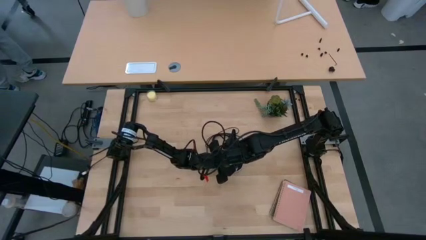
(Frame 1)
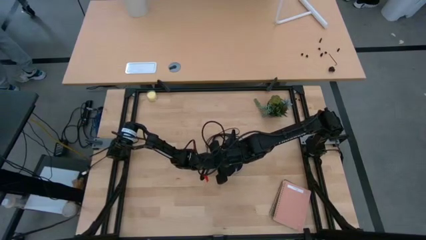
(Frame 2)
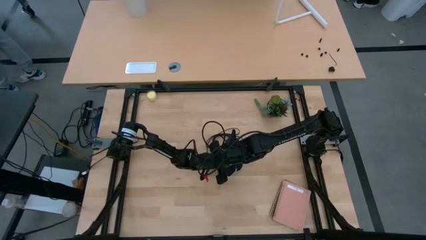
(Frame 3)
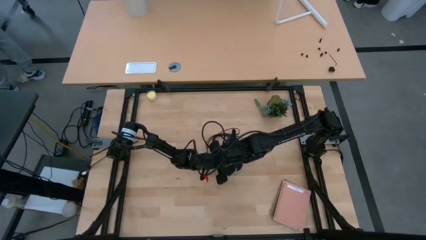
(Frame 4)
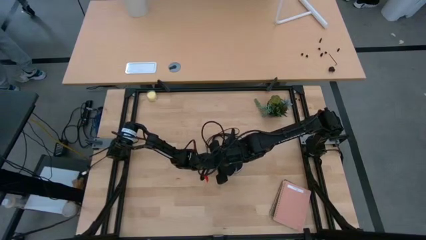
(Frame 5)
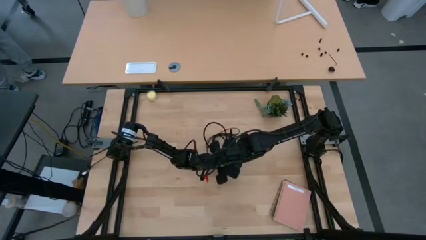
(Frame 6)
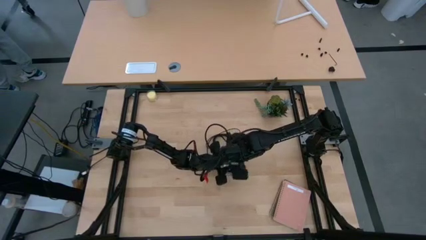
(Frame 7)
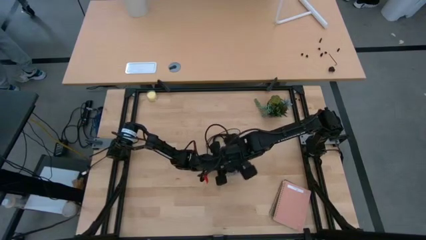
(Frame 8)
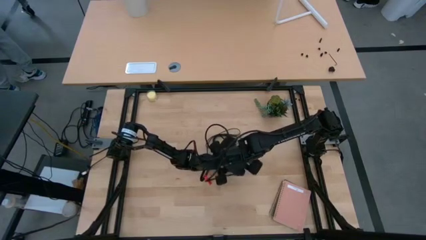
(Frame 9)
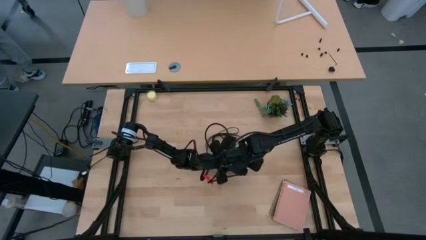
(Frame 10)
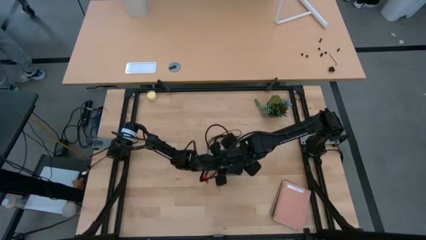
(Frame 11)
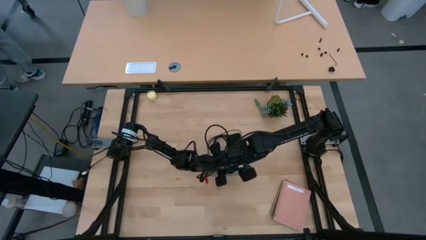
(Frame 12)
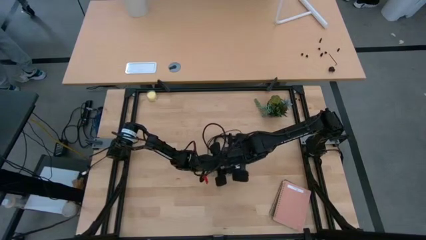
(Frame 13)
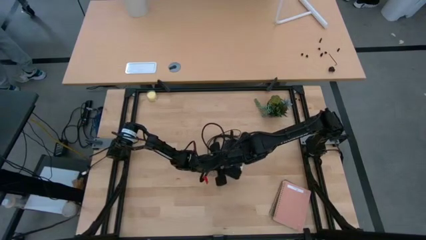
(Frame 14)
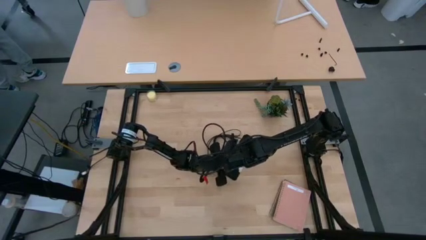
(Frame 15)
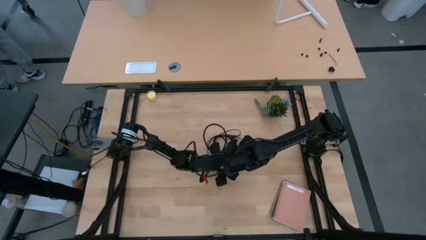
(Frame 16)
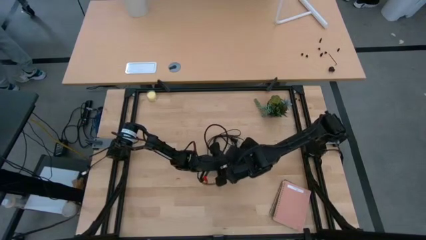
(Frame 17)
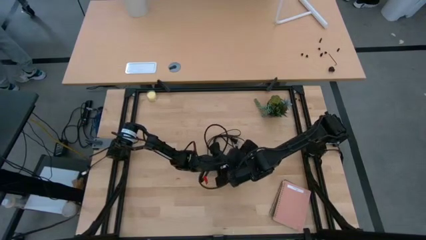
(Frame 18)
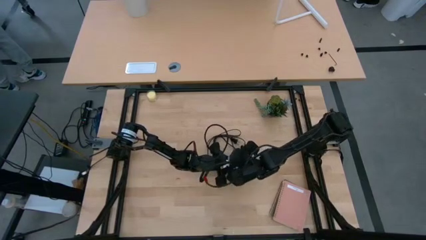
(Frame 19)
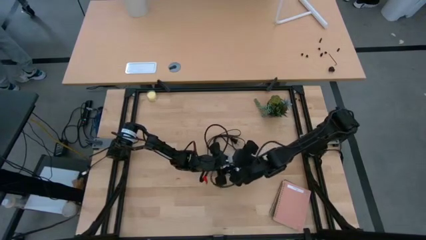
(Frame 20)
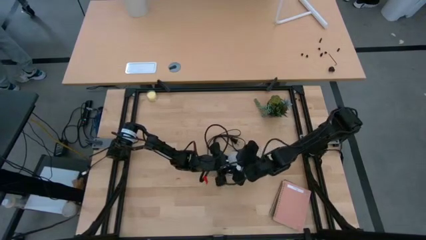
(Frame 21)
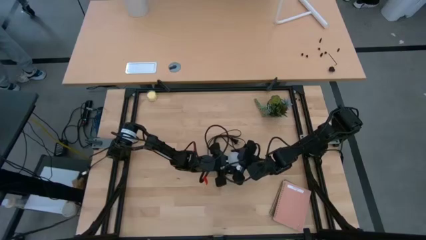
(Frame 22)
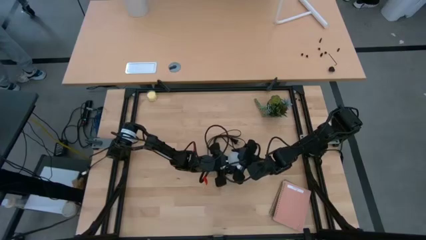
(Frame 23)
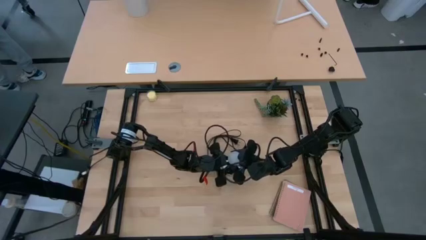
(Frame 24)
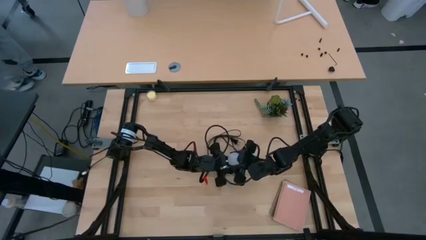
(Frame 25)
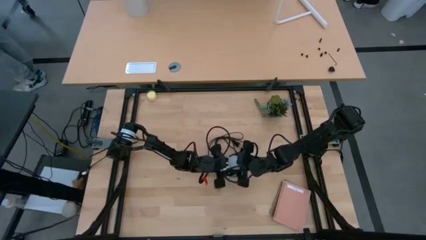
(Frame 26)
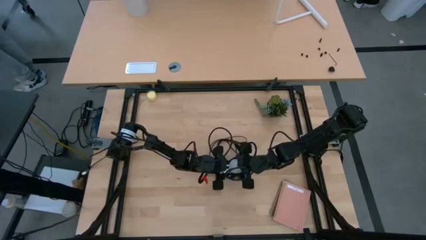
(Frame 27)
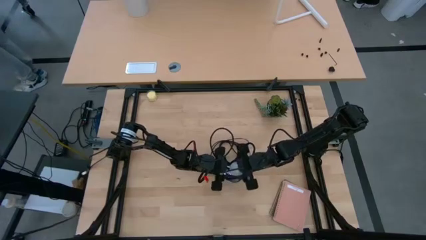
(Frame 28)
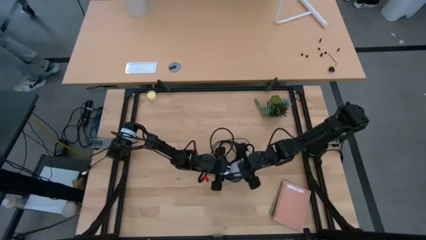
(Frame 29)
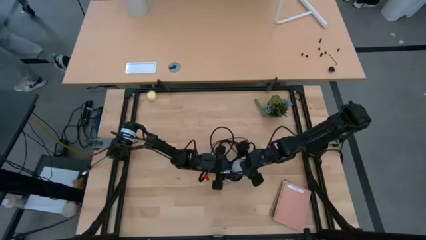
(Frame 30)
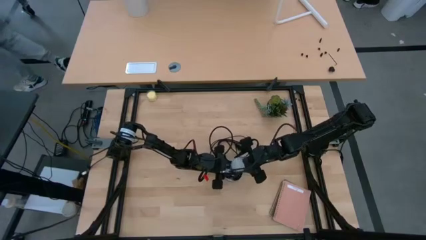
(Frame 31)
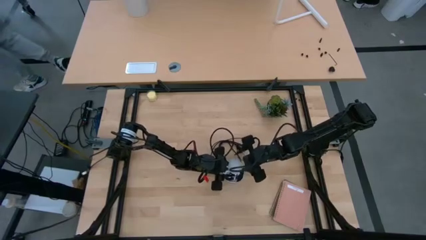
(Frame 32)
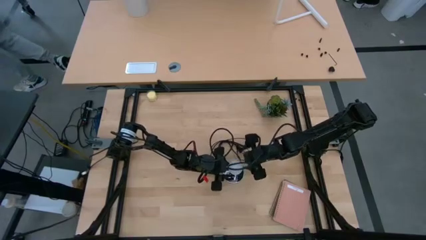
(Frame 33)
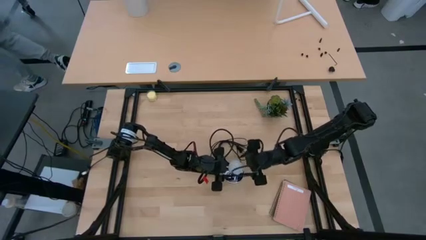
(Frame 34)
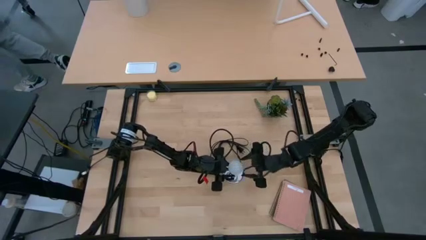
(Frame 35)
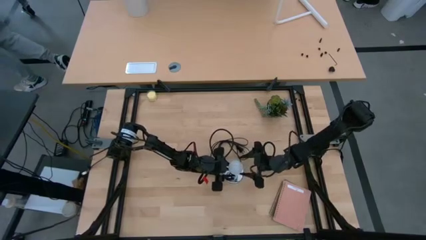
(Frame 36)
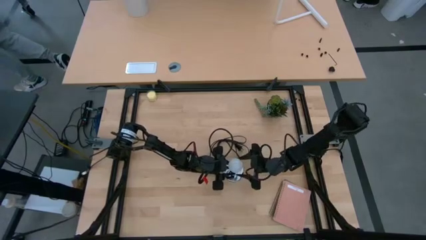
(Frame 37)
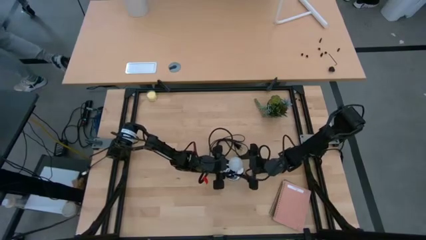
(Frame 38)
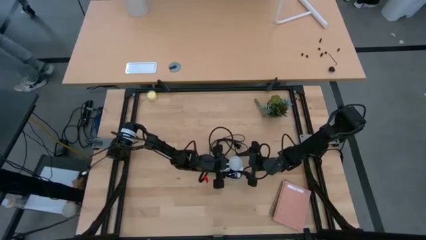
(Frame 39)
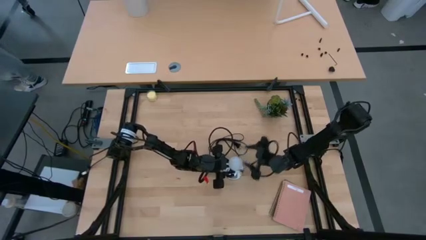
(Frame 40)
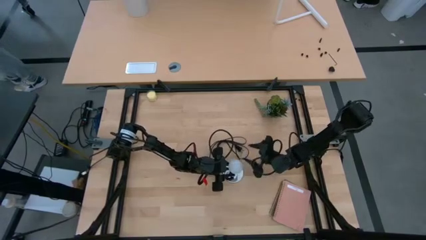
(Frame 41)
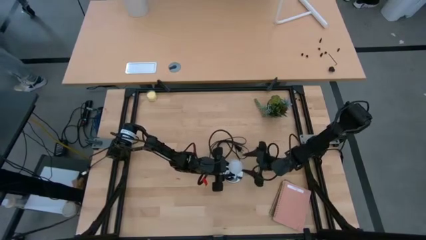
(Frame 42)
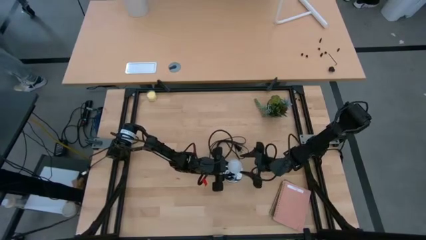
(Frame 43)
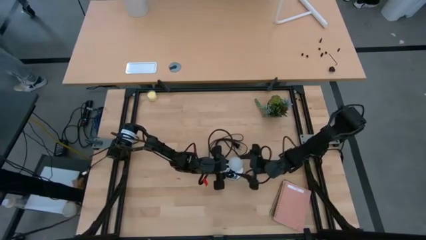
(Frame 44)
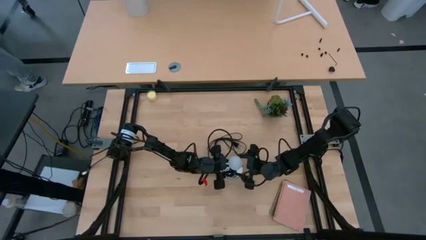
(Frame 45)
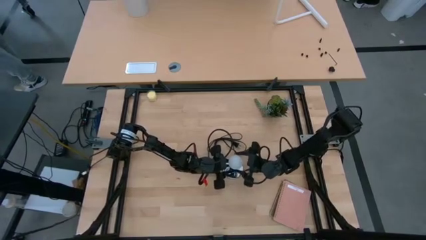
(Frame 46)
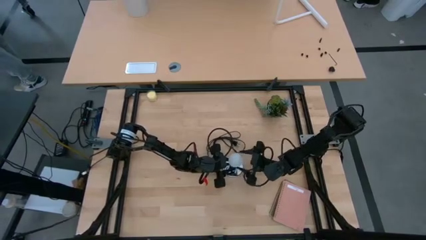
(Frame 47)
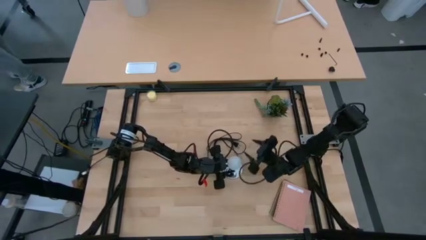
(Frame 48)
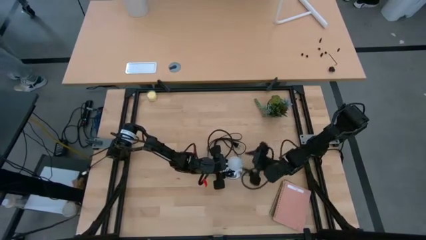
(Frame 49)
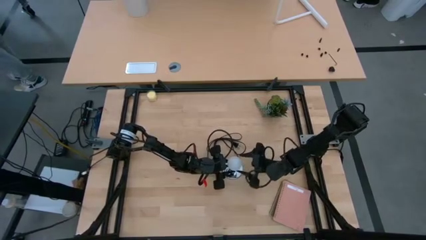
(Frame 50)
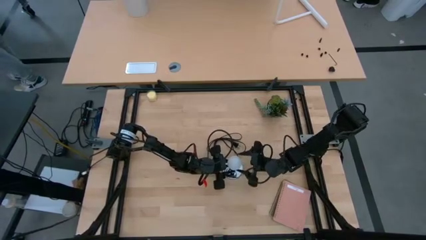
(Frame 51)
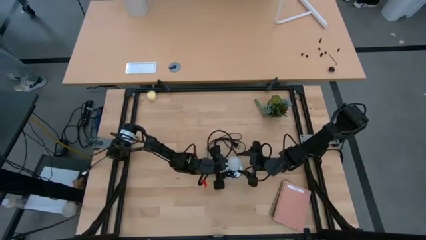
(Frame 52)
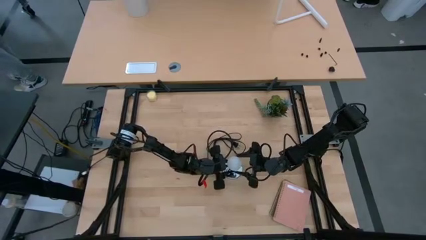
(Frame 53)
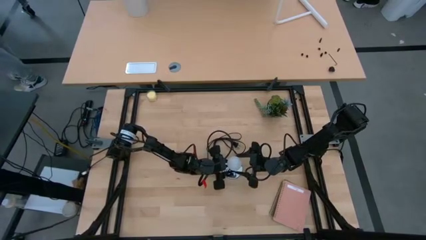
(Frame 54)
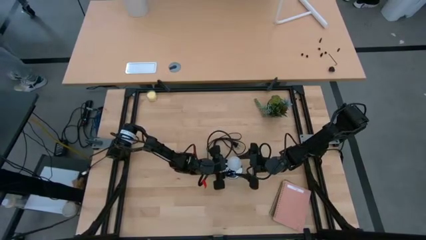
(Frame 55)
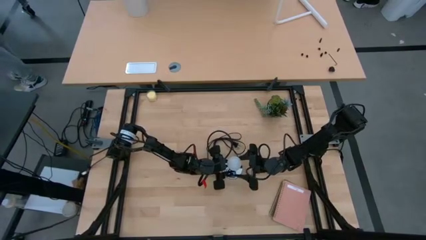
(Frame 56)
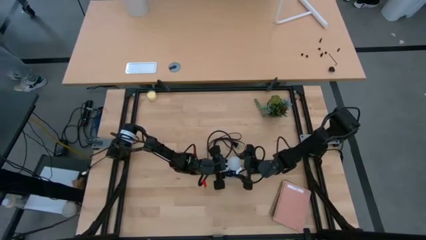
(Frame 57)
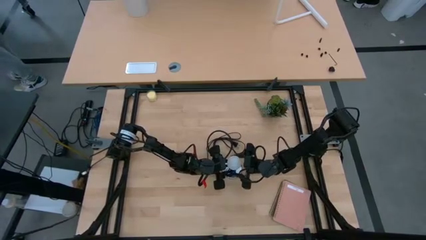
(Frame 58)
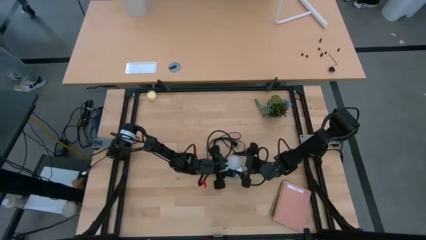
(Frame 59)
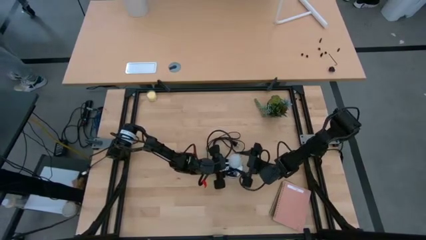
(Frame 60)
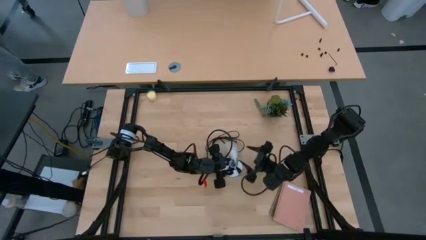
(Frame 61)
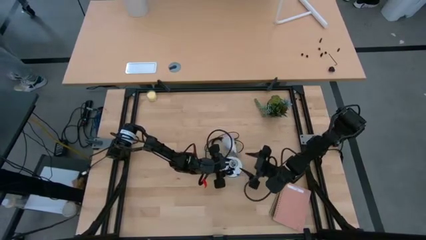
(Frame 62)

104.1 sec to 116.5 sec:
Task: Screw lightbulb
Remove the white lightbulb from the lamp

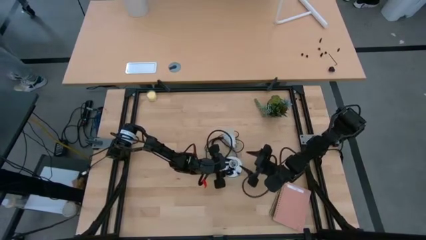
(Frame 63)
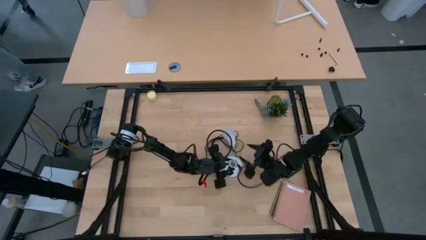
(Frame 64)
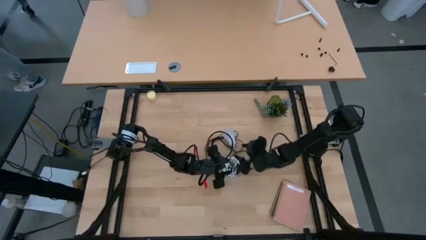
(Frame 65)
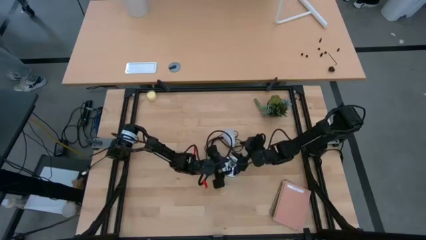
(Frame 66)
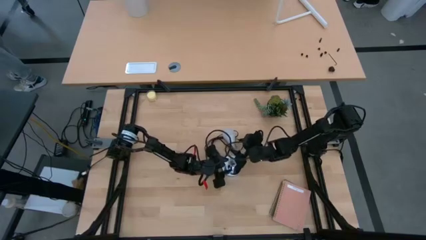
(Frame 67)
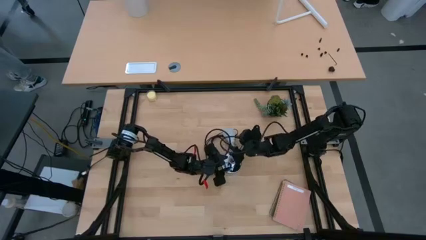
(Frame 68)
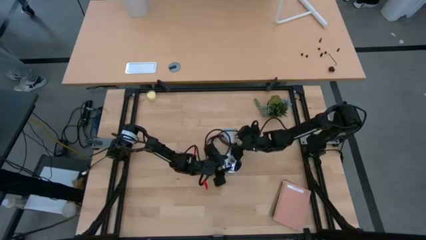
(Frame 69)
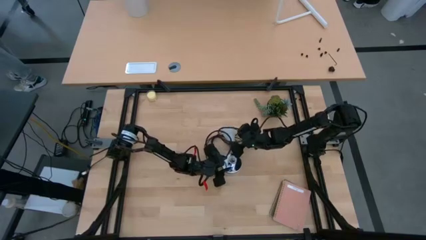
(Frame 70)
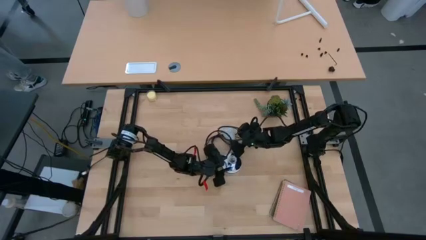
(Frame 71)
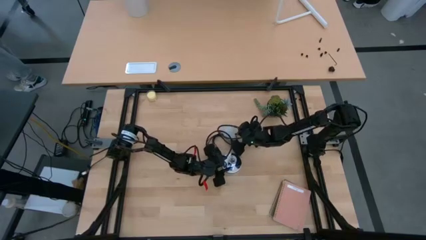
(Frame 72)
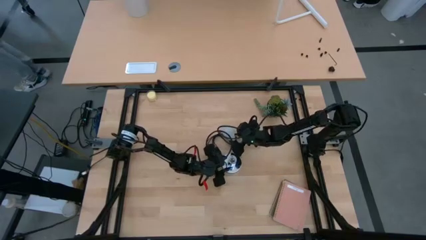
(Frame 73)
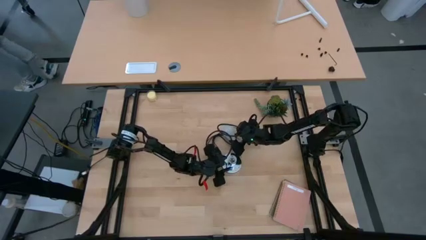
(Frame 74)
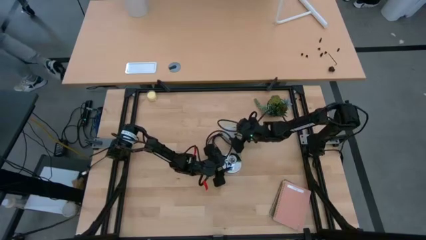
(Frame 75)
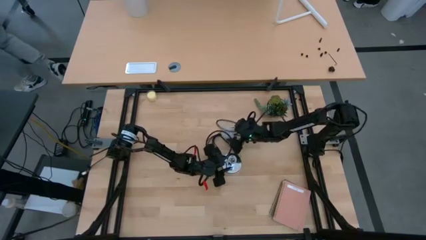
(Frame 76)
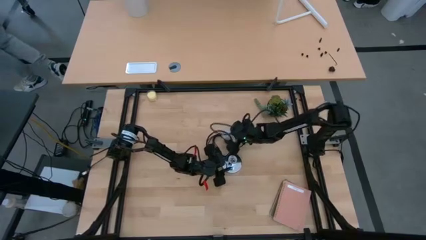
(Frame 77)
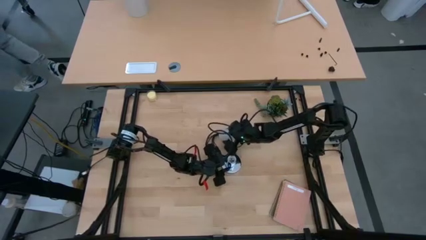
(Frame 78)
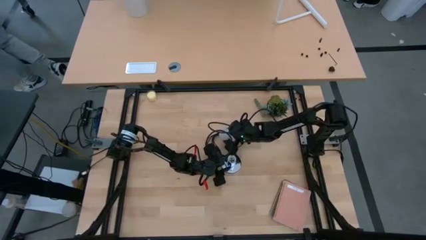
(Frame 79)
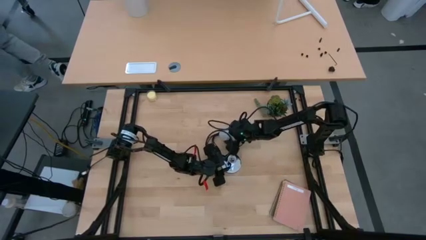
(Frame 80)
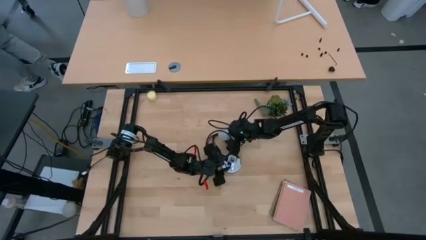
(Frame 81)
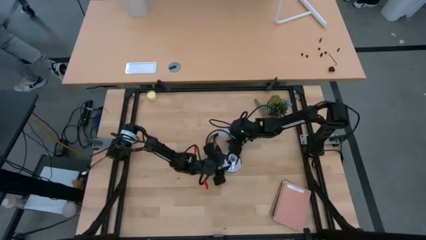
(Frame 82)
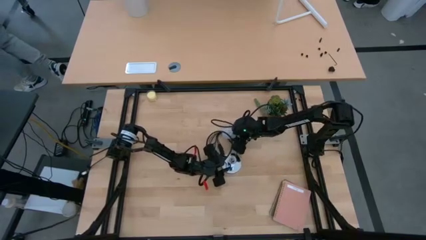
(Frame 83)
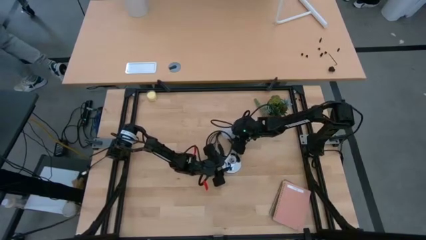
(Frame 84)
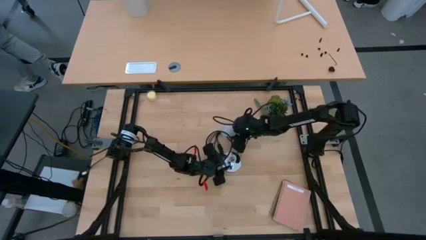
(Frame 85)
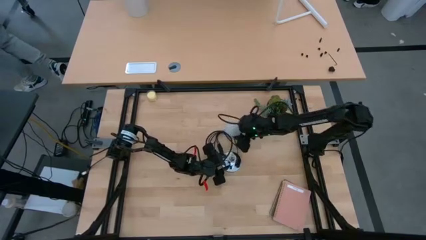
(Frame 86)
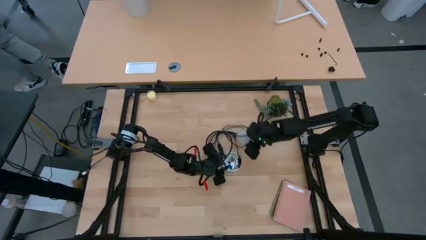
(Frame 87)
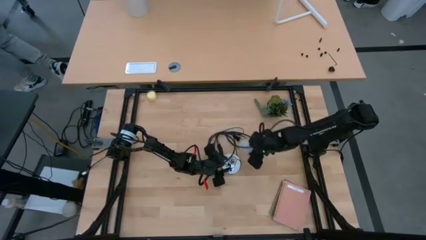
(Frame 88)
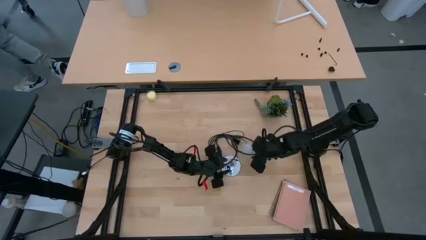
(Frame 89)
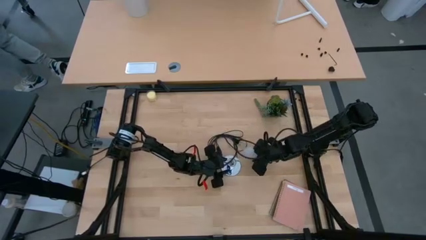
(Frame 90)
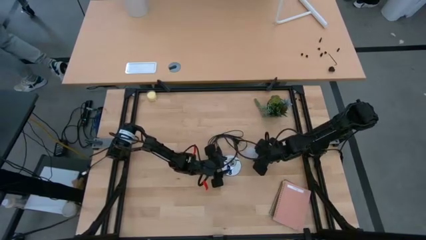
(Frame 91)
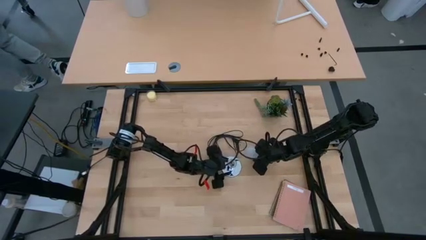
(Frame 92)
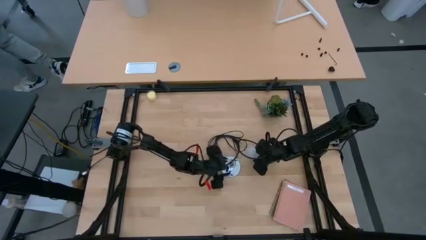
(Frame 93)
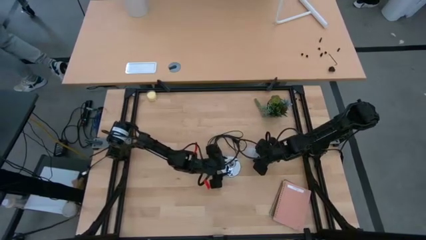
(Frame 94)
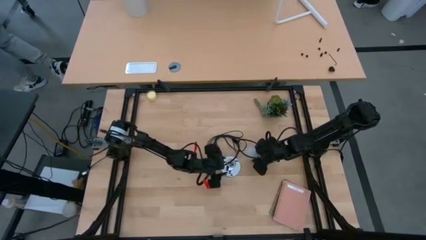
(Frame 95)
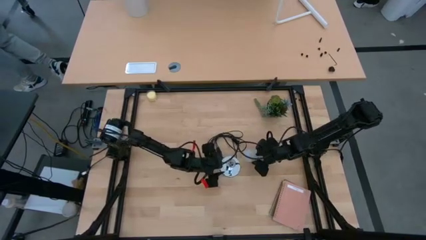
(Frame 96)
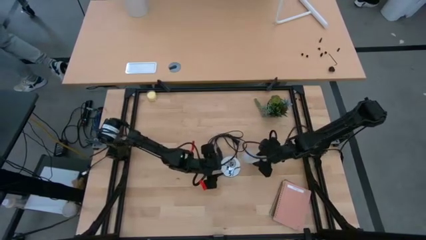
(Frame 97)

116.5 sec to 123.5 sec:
Move the white lightbulb to the middle right of the table
